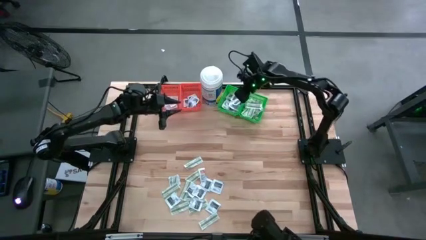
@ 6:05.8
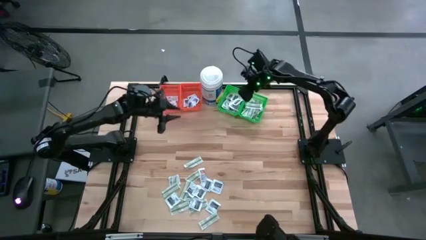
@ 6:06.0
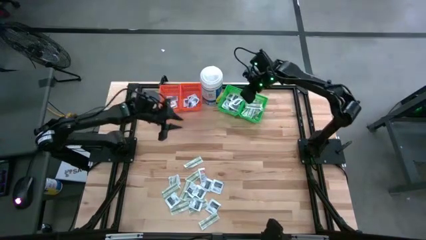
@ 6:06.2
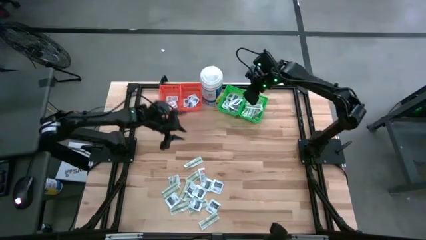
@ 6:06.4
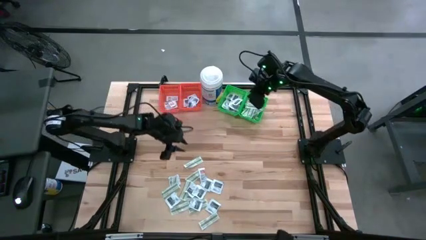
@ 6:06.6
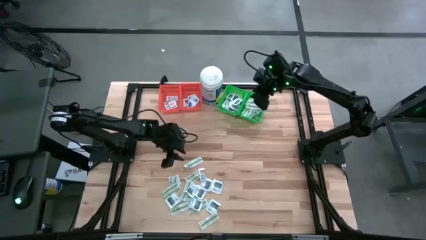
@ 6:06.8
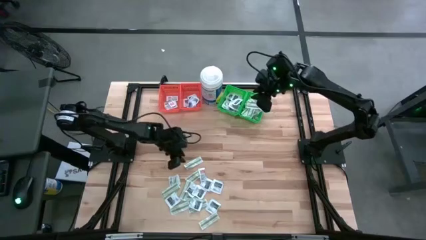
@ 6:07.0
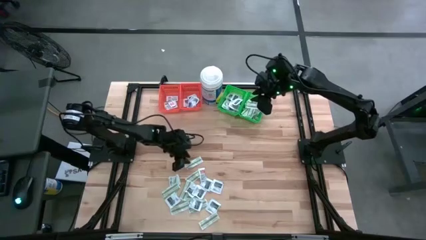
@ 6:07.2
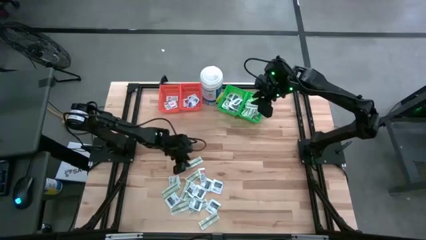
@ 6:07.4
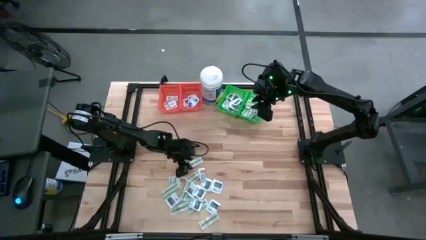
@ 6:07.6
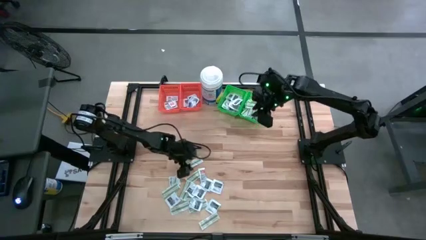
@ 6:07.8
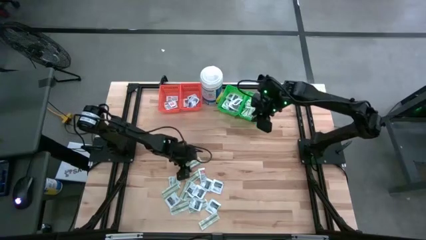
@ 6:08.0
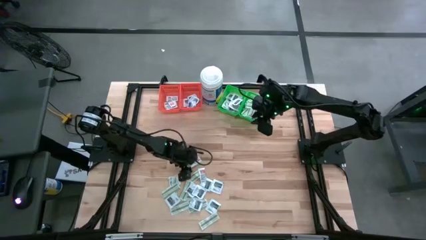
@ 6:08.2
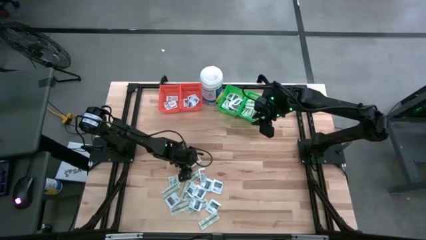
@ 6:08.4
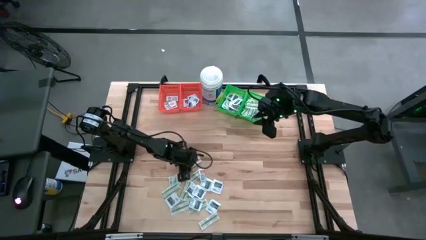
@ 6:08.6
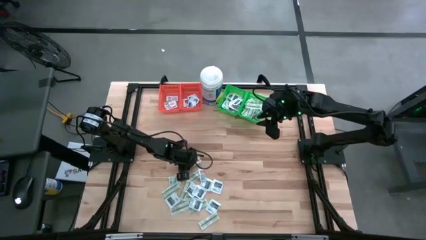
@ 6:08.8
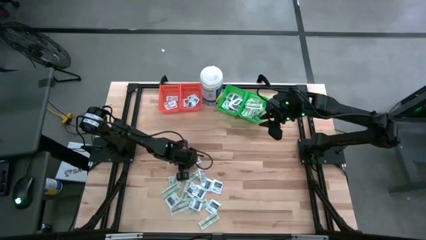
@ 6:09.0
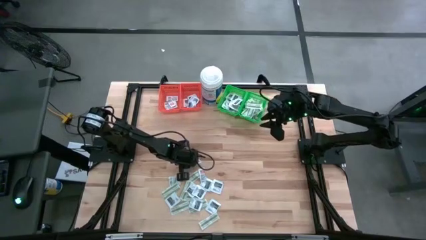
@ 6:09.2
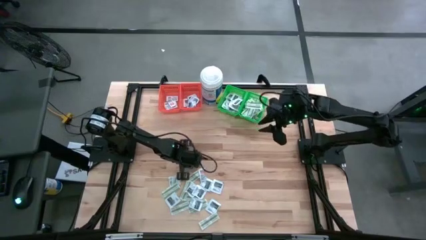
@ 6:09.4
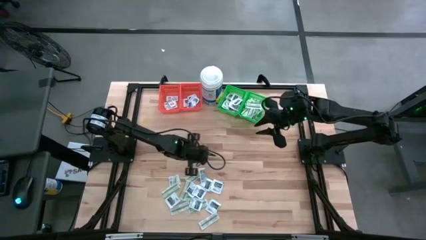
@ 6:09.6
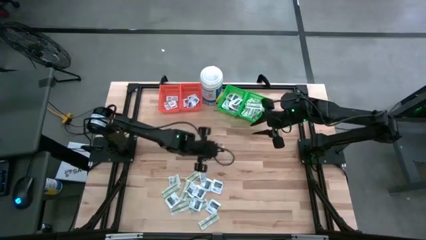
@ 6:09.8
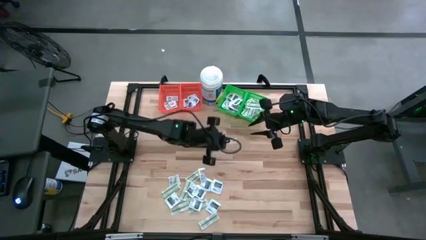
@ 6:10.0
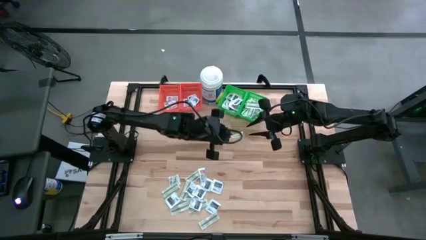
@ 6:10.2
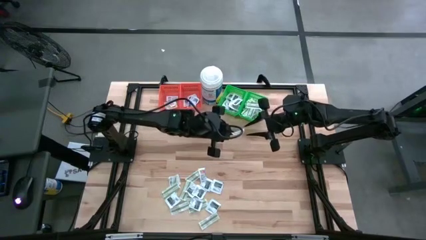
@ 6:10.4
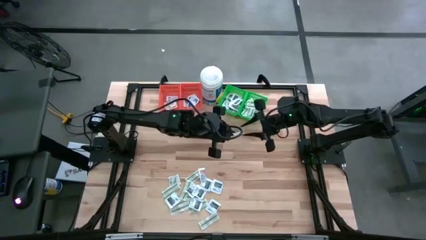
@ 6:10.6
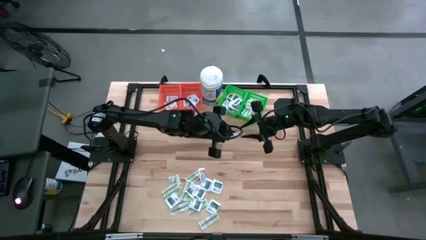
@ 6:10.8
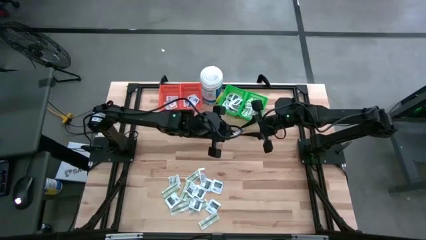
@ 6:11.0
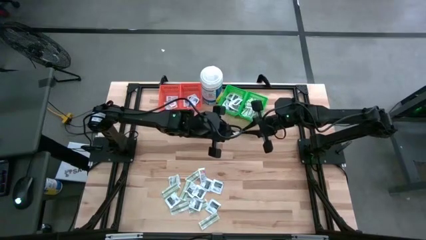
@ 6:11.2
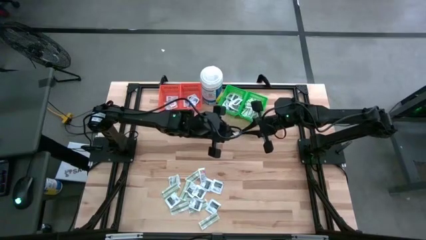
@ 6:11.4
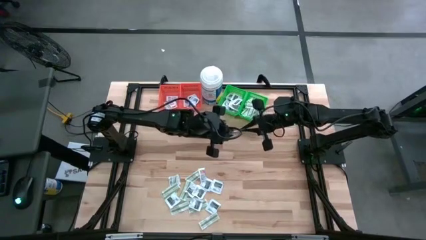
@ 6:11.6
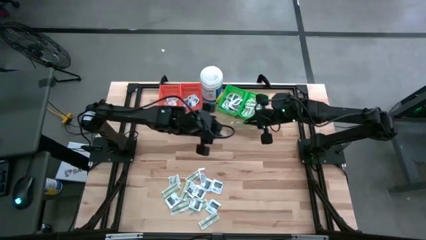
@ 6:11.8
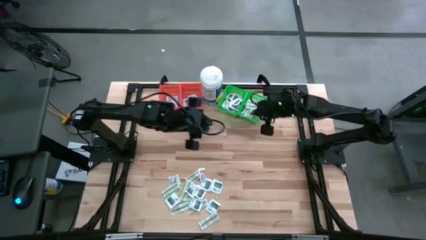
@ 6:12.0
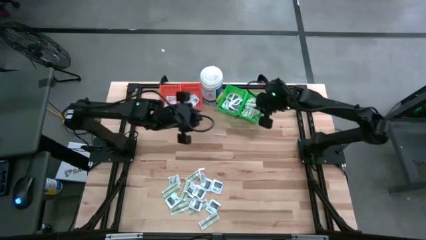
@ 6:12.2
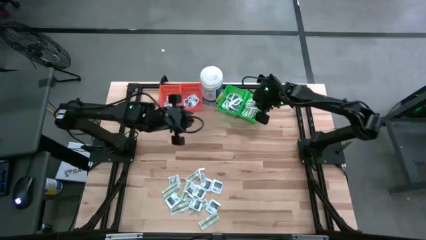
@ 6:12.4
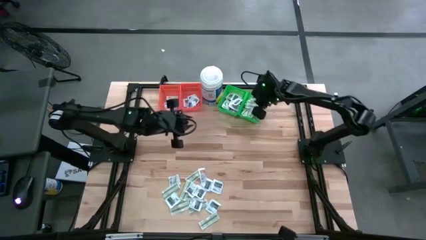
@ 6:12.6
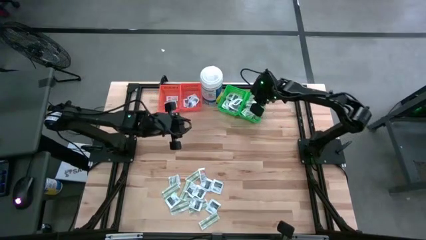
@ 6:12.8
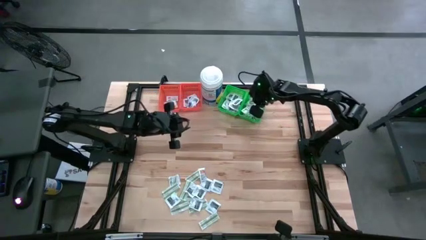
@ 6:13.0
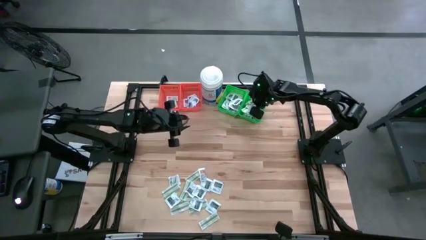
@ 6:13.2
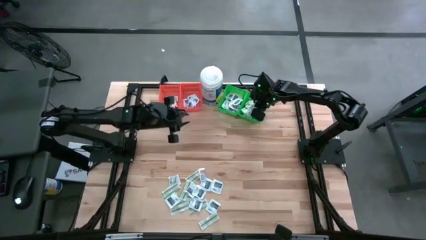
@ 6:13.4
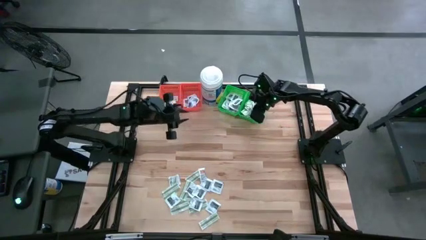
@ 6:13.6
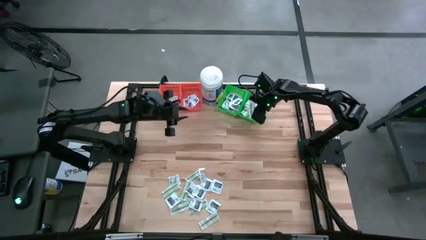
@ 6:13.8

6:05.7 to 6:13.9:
Task: Pick & Place First Aid Supplies
Put the green bandage pack into the right green bin

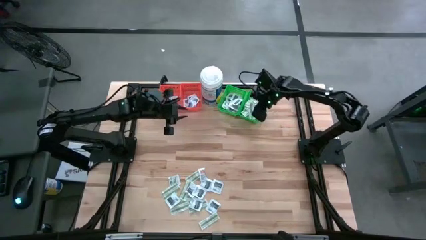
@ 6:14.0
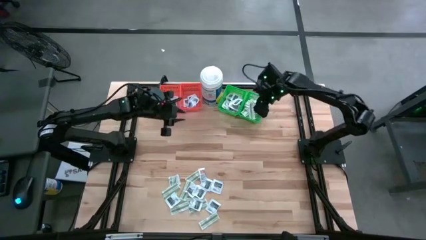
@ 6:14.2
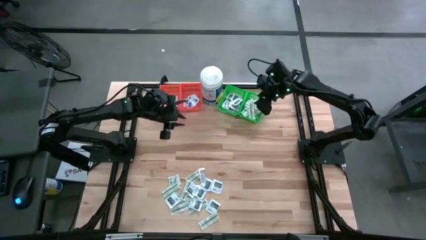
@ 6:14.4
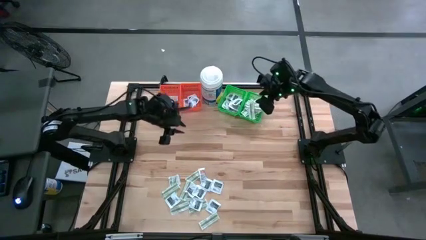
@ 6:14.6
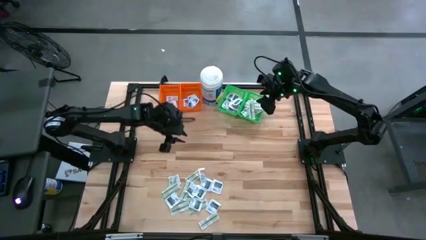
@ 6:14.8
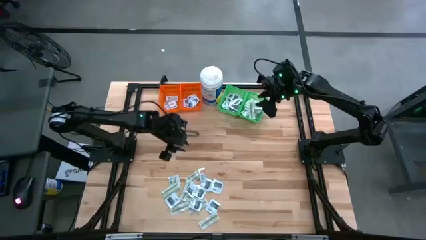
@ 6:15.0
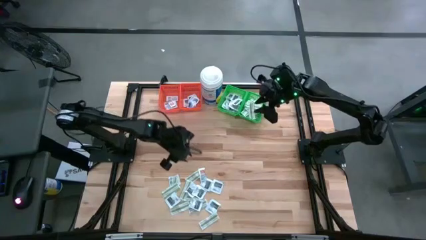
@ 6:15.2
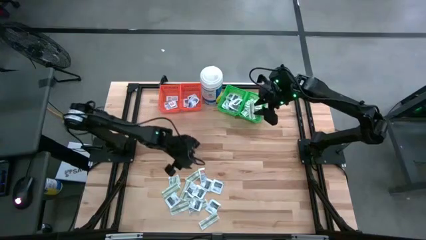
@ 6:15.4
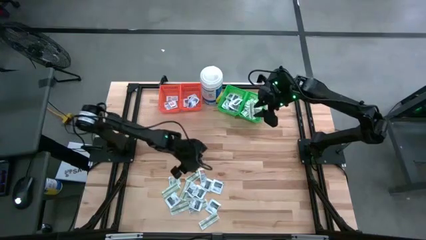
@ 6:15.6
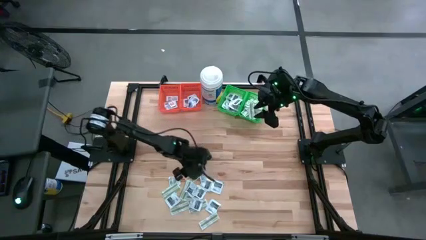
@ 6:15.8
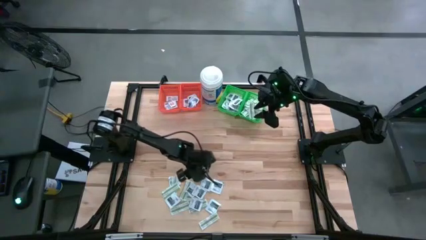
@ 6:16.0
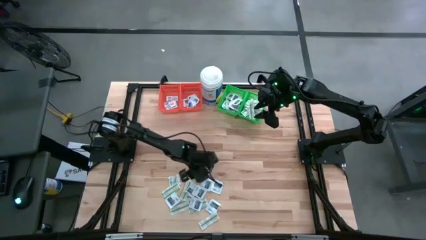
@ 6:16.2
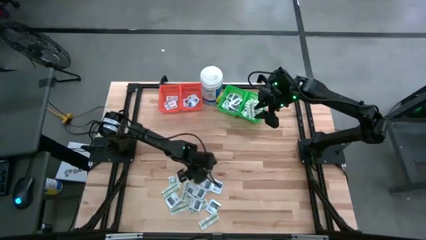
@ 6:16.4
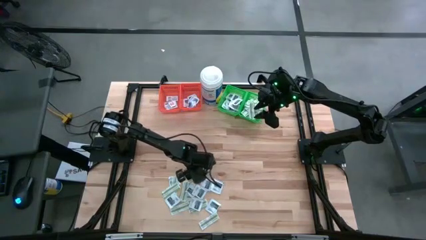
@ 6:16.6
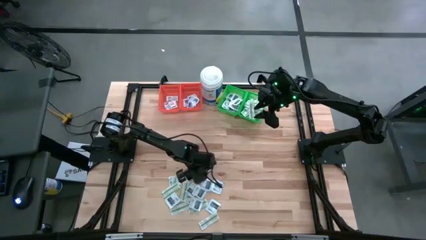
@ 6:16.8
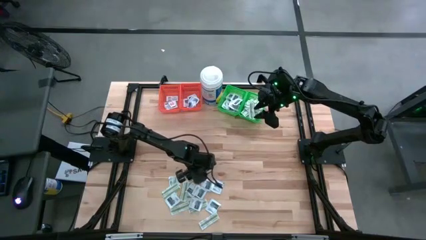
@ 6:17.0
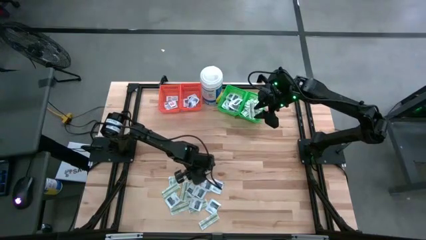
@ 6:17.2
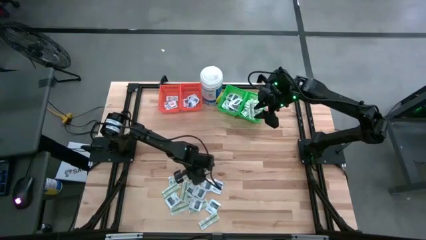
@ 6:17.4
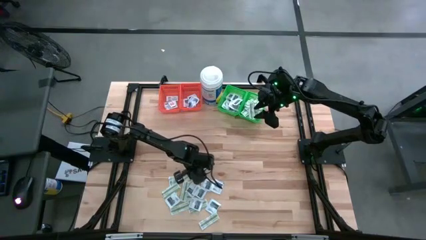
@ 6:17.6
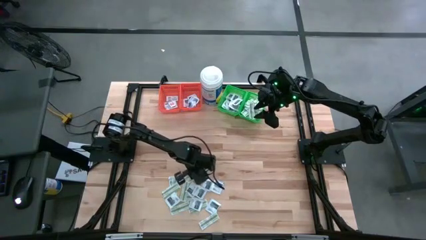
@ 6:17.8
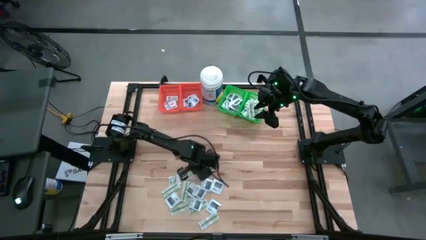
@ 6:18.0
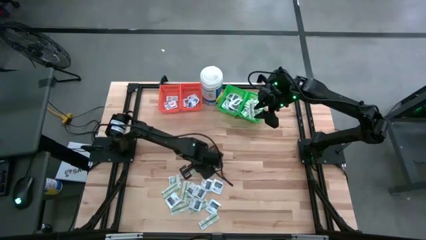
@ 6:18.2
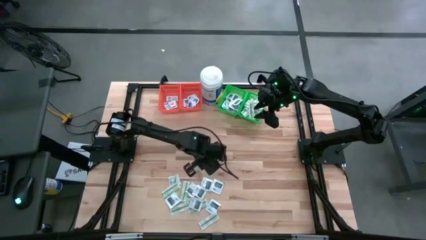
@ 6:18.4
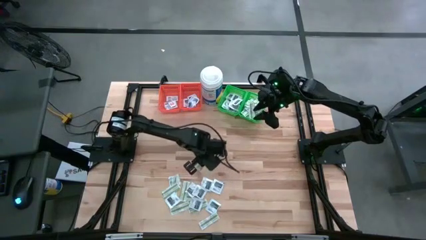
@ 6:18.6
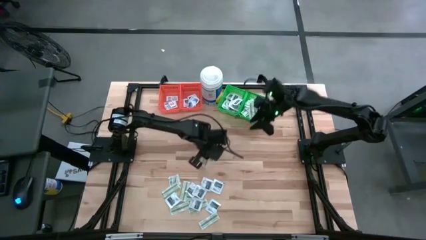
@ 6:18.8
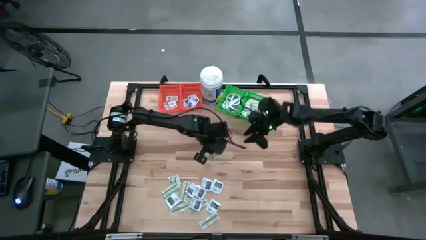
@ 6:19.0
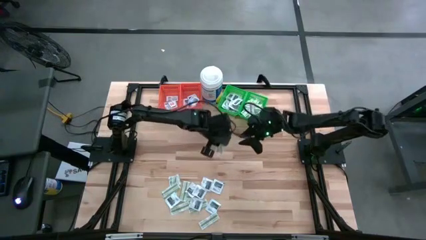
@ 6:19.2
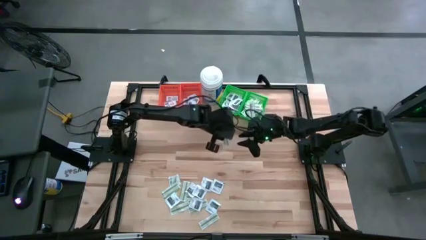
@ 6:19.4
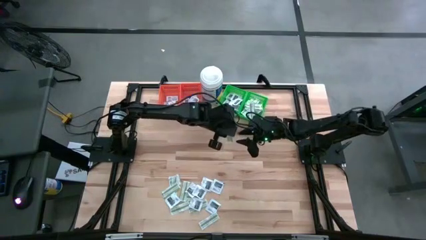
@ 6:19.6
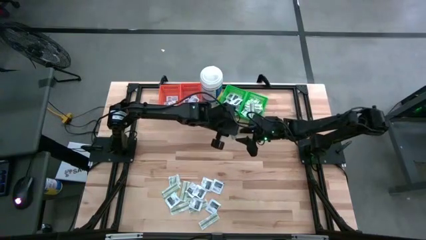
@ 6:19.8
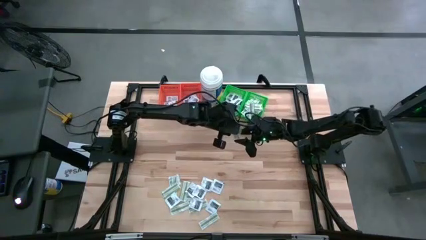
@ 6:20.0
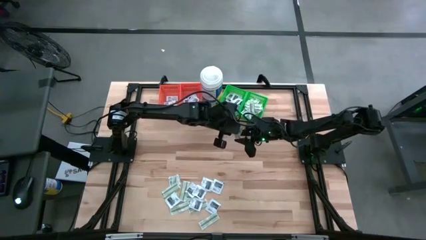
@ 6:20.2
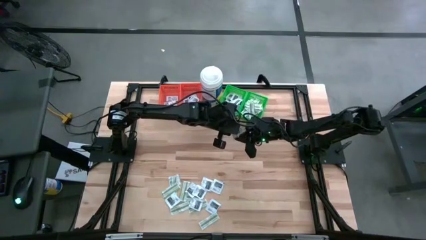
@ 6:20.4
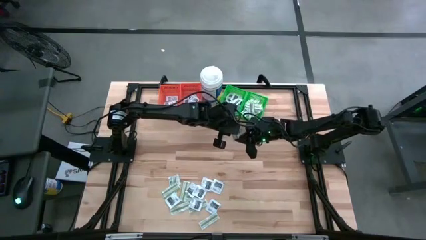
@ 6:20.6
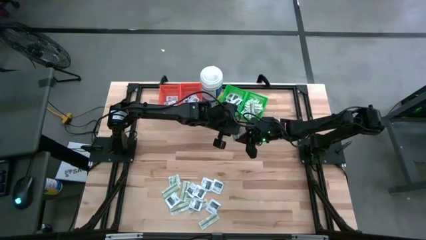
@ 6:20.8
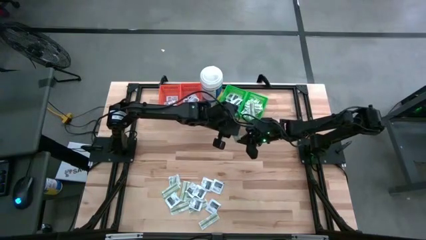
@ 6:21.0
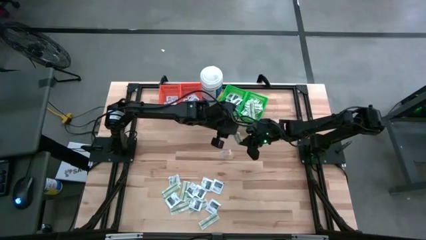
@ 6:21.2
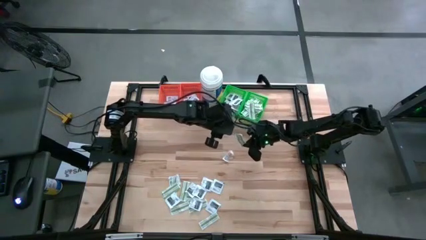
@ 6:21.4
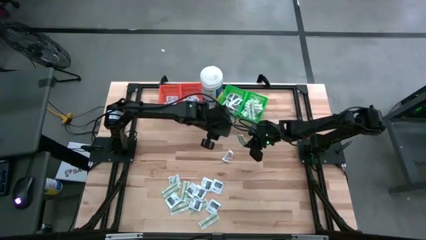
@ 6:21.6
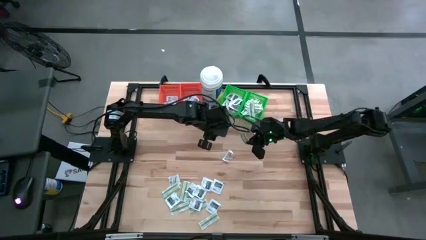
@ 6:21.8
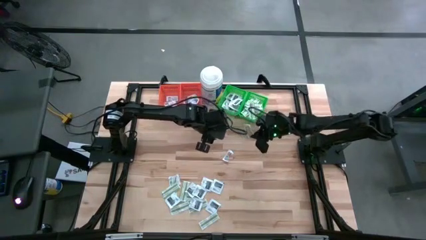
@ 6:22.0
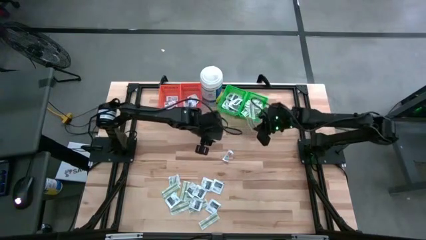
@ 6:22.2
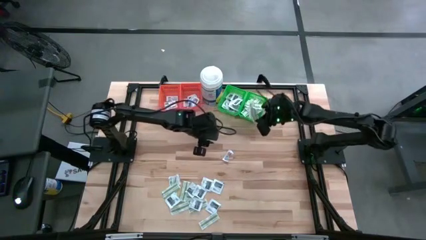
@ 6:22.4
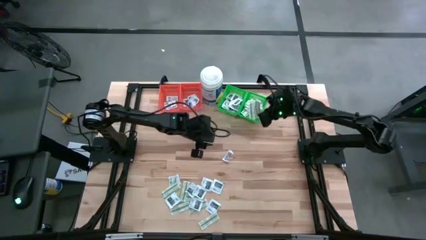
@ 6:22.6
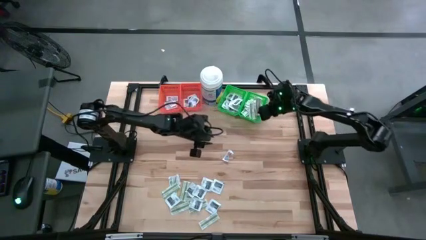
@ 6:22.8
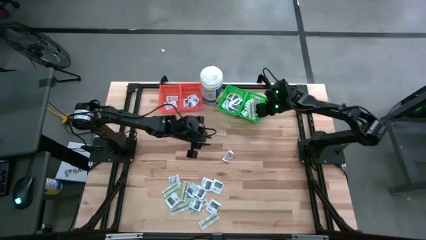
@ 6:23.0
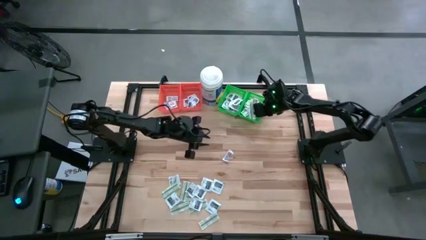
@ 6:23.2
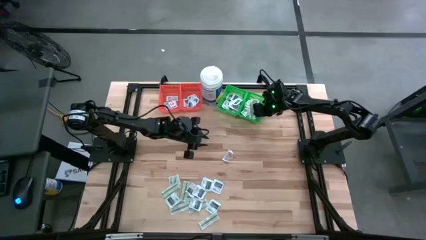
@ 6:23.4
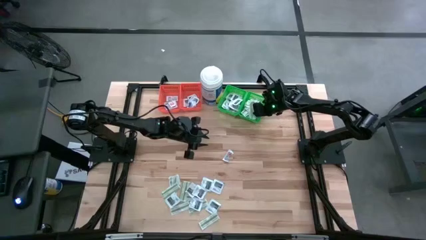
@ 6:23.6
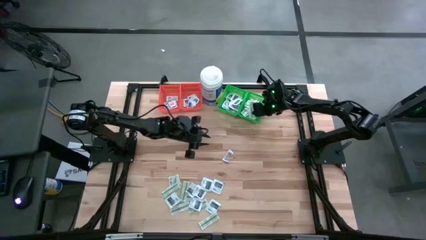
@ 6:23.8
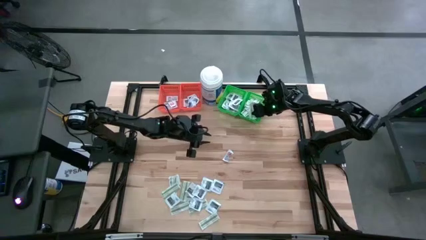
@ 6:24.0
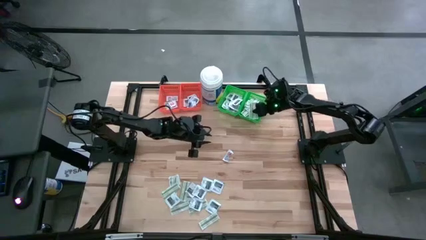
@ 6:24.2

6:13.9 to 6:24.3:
Put the green bandage pack into the right green bin
